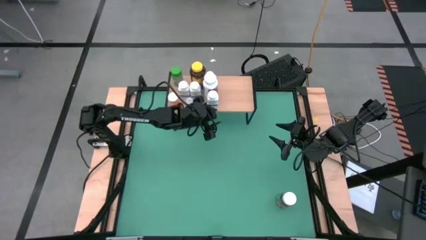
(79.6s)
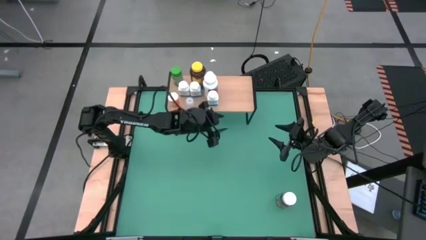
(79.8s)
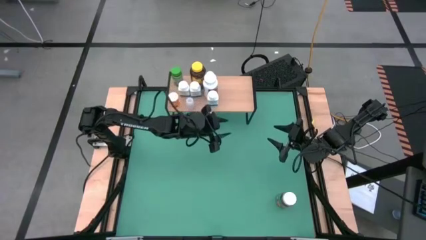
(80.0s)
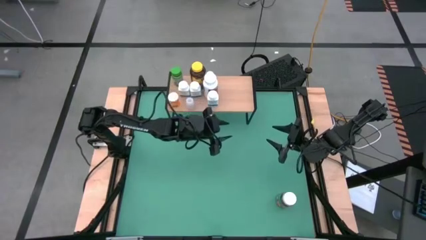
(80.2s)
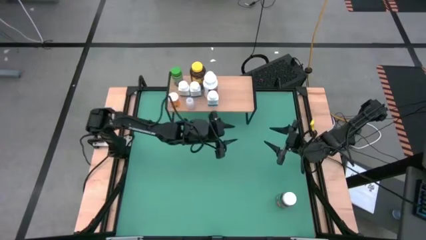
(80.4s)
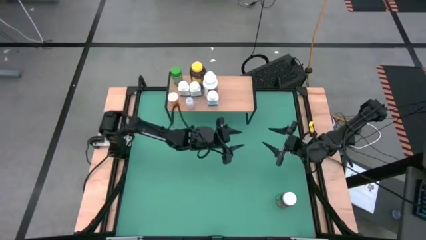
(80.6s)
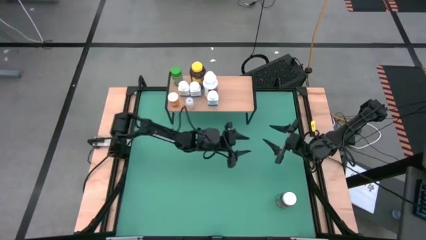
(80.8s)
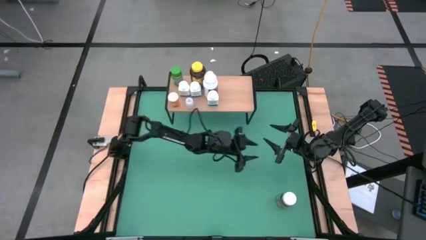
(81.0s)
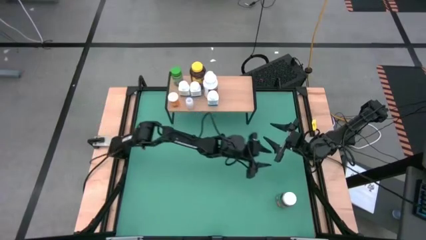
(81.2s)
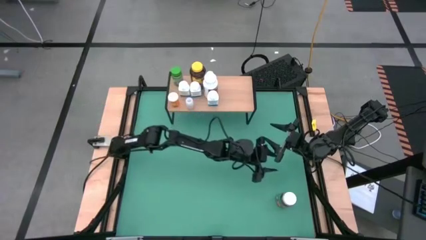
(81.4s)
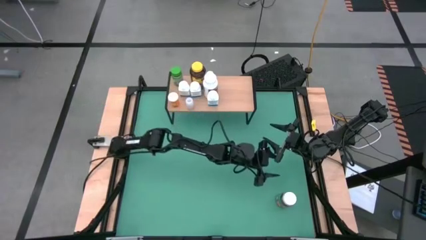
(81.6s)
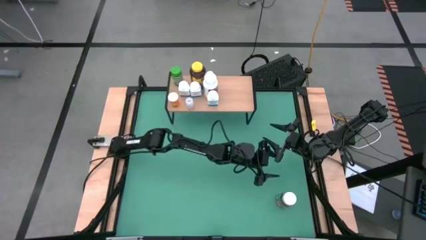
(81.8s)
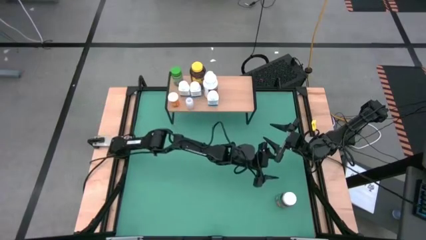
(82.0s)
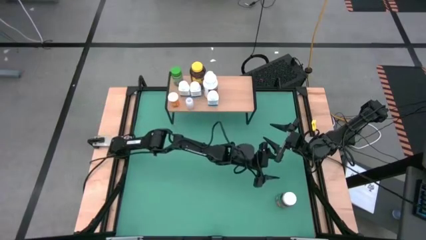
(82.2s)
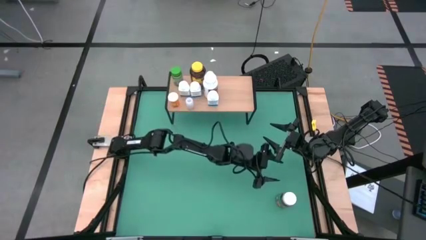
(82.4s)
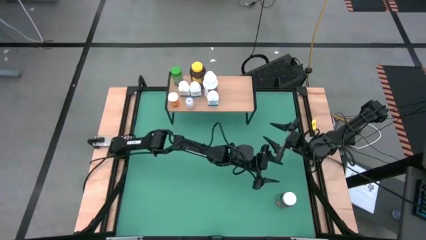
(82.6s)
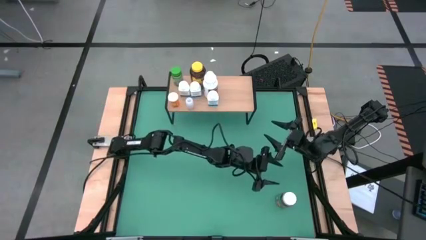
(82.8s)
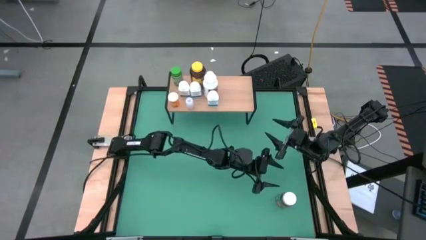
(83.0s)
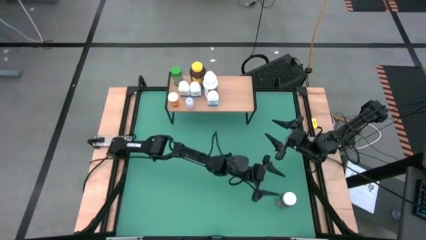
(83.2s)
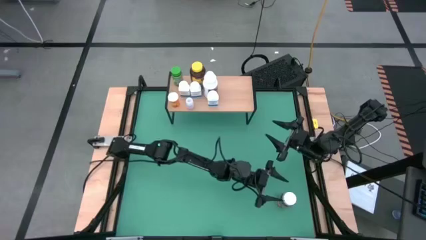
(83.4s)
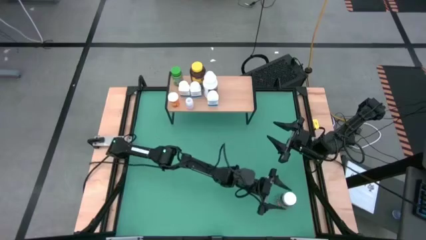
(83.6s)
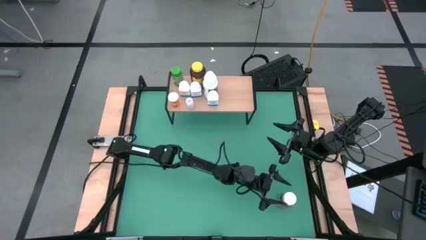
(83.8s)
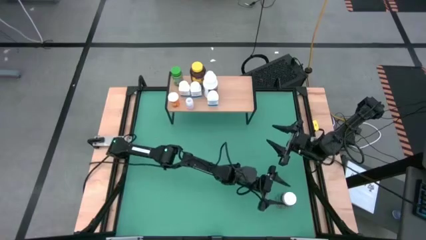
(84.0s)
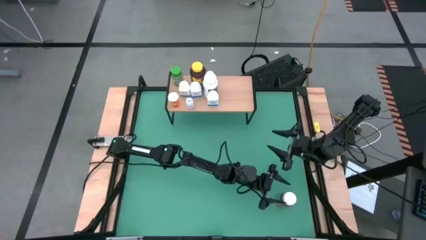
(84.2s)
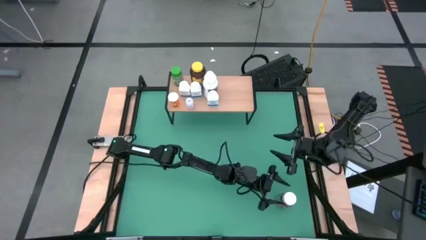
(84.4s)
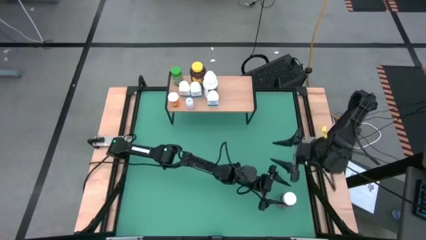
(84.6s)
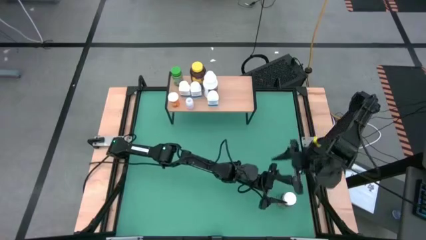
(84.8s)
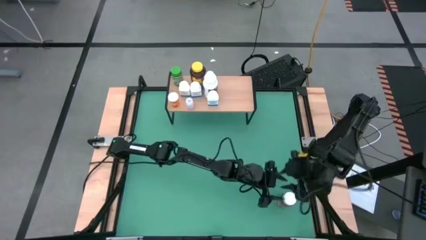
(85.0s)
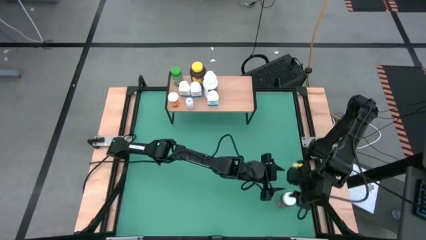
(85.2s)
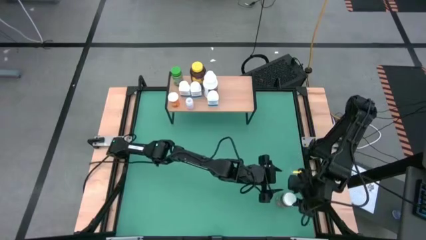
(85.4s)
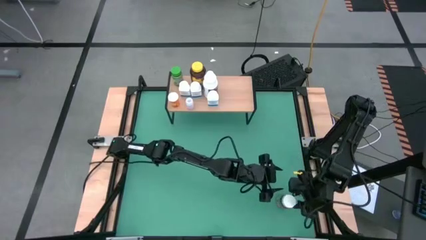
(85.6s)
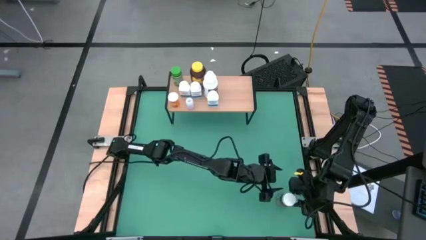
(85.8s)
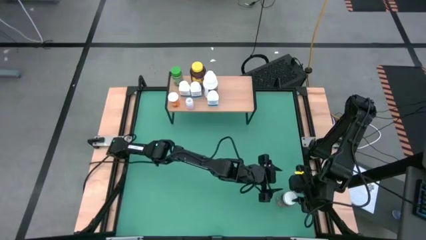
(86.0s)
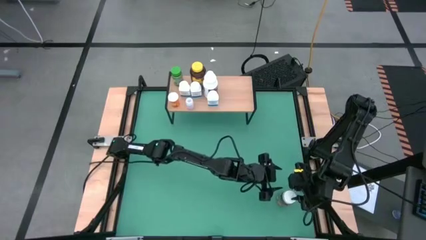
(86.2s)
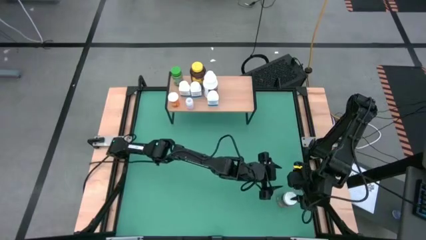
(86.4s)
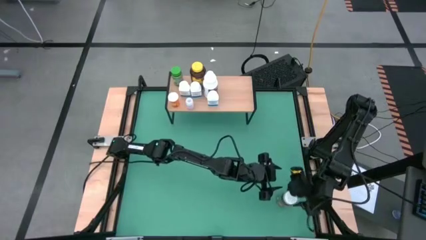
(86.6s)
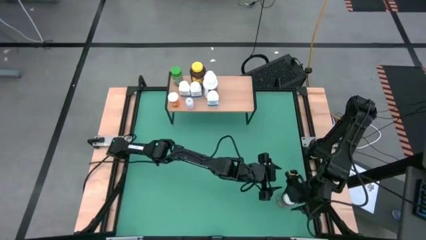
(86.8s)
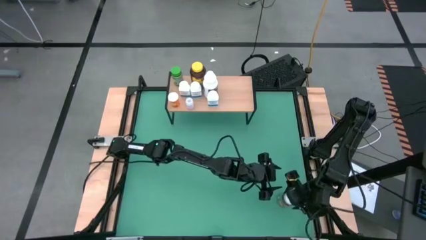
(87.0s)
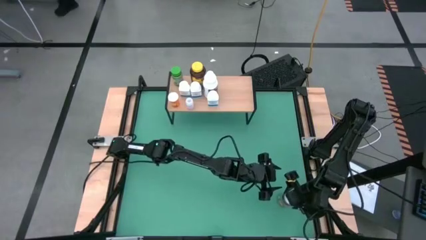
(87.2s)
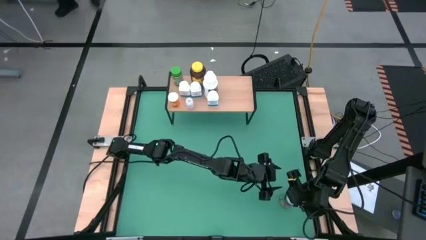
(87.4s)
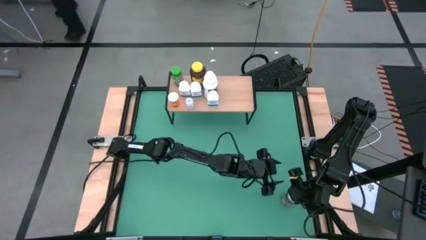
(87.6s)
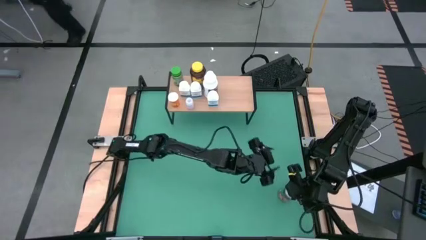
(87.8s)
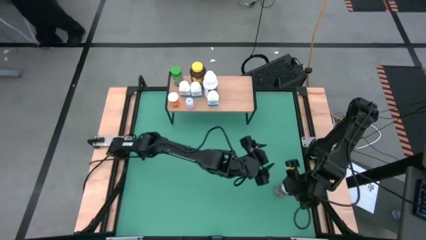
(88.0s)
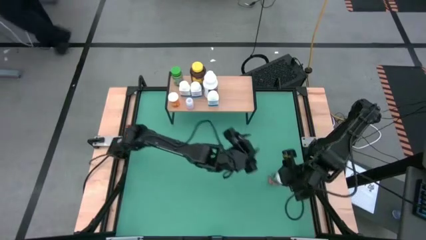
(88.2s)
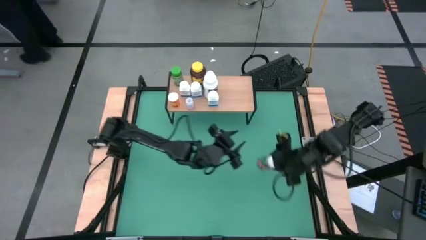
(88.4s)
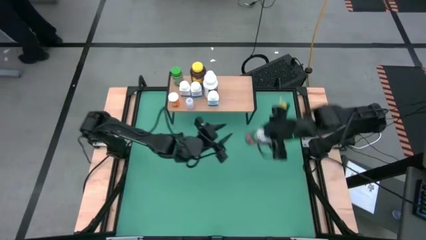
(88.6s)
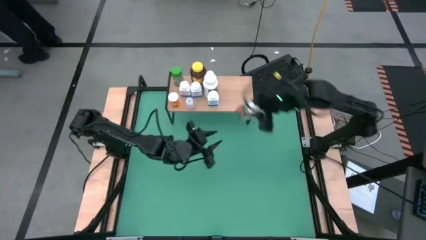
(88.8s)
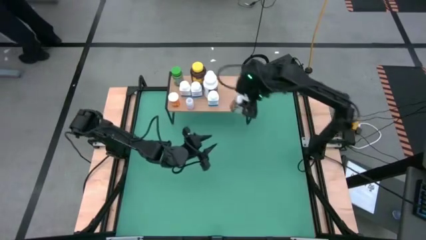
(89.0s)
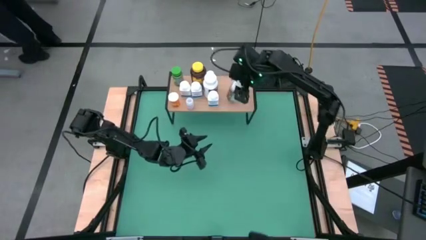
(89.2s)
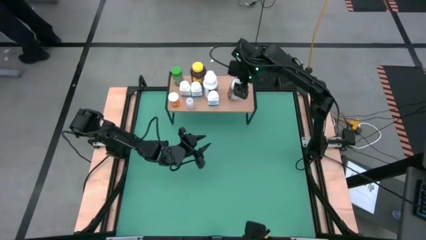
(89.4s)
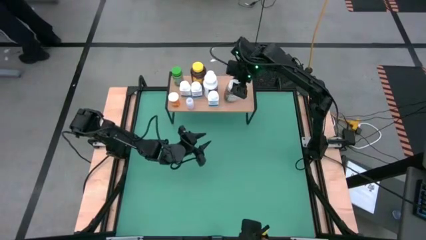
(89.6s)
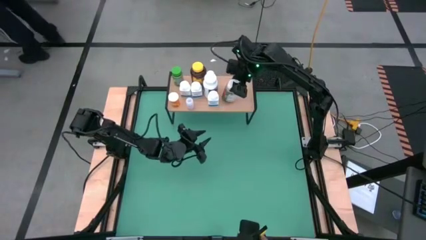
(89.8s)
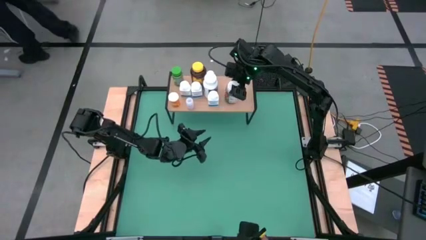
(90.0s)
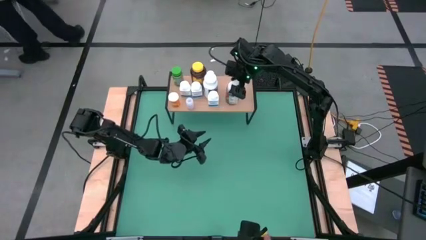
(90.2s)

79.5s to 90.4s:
Task: Pick and place medicine bottles onto shelf by color
Put the white and green pill bottle on the shelf

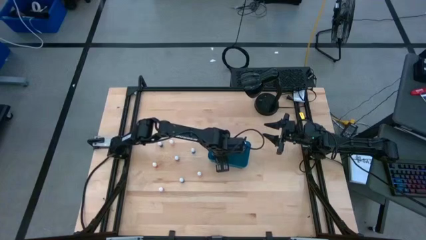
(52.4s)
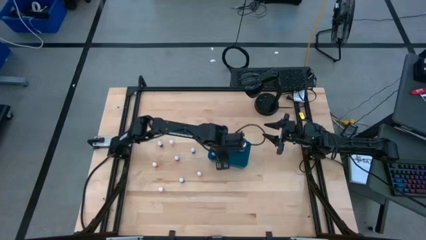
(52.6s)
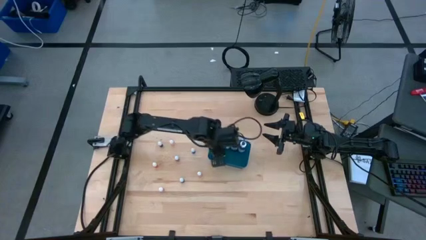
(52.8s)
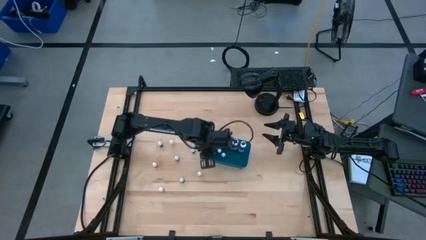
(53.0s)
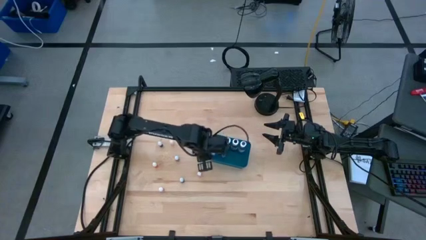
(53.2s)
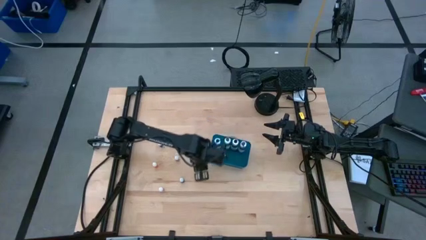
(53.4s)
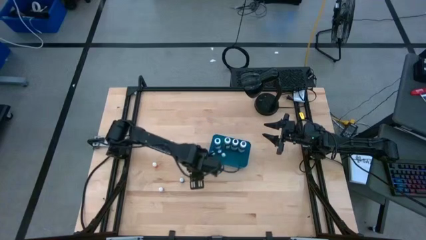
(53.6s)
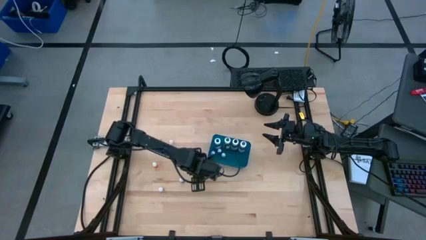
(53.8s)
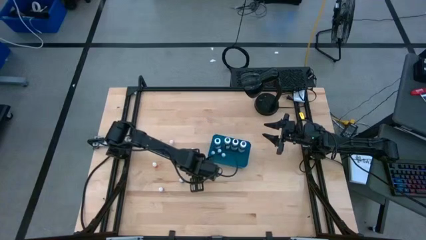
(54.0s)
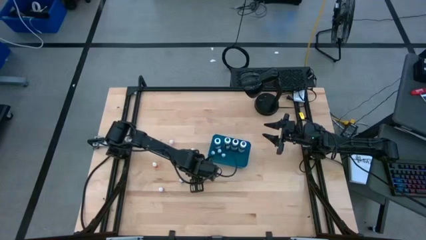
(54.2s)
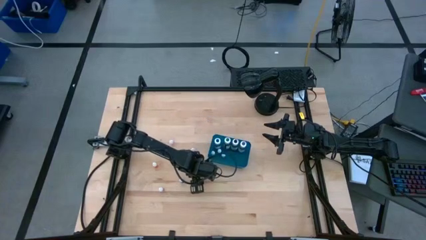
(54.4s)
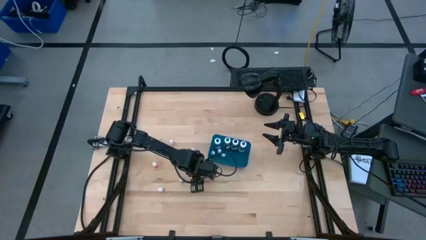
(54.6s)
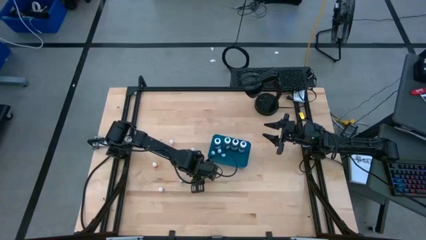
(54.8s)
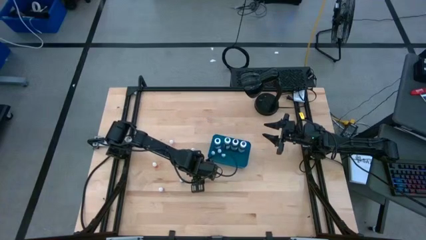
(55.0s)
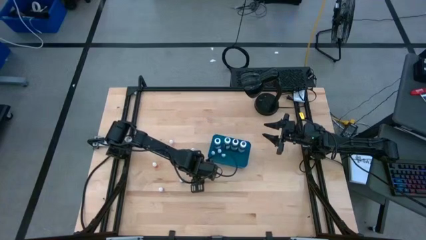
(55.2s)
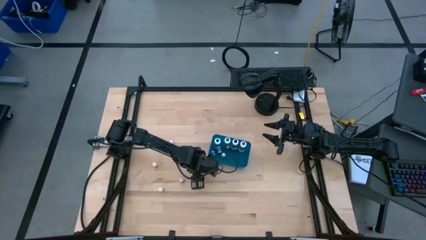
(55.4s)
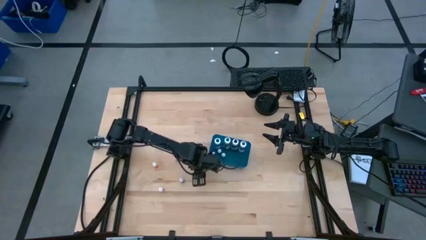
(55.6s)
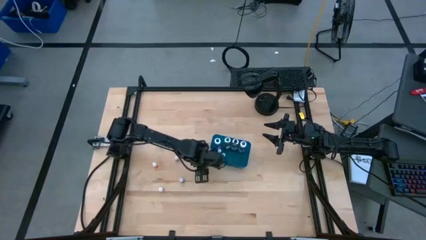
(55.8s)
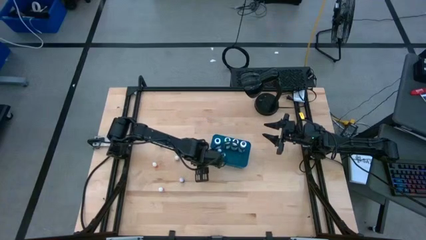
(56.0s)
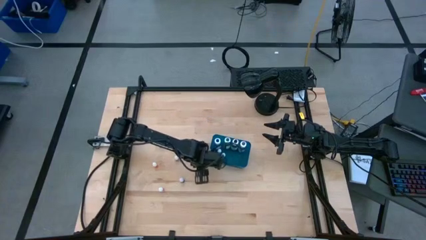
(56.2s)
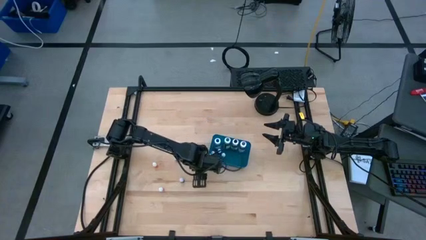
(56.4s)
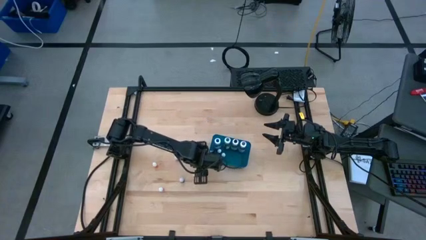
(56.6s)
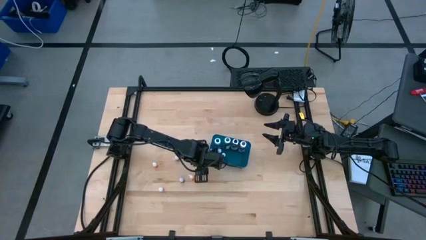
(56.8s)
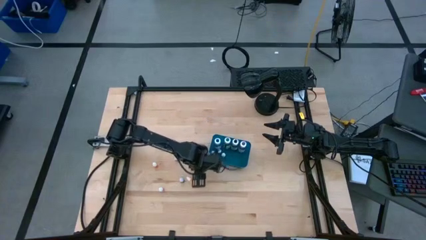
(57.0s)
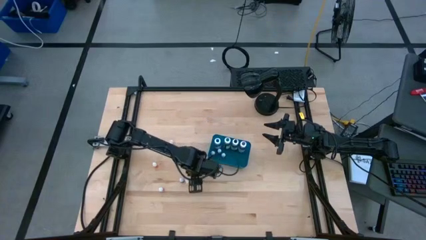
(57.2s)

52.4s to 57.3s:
Task: Pick & Place food coloring
Put the small yellow food coloring bottle into the blue container
